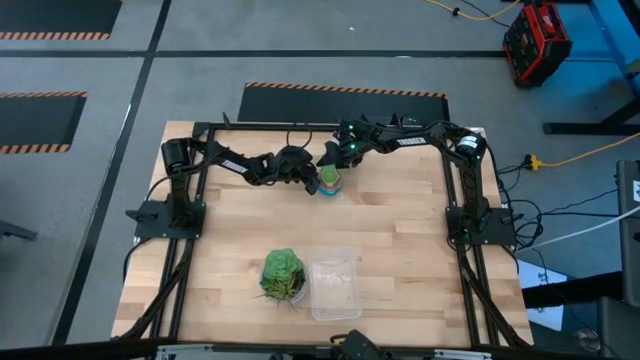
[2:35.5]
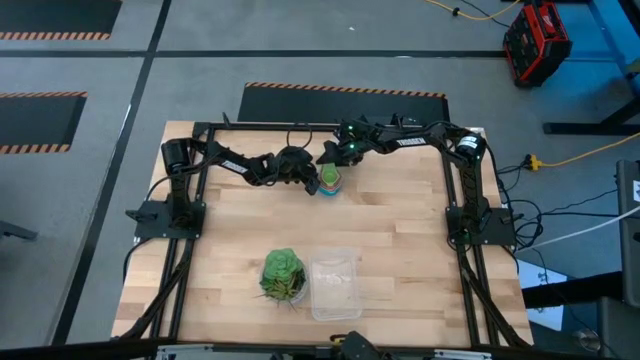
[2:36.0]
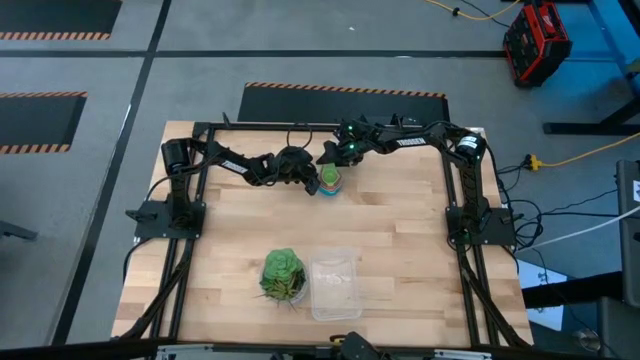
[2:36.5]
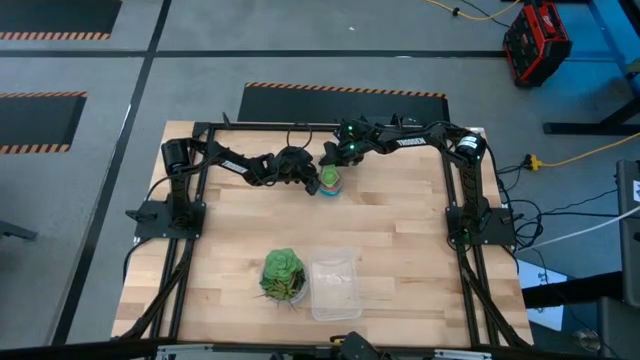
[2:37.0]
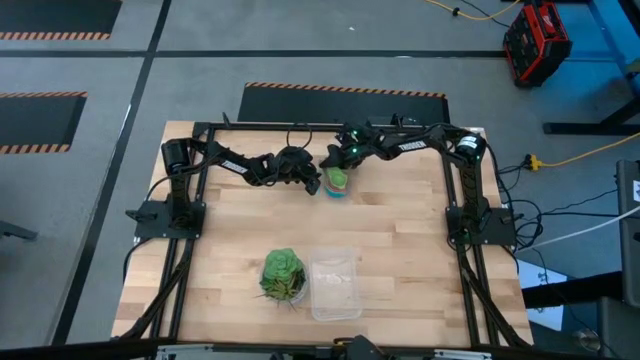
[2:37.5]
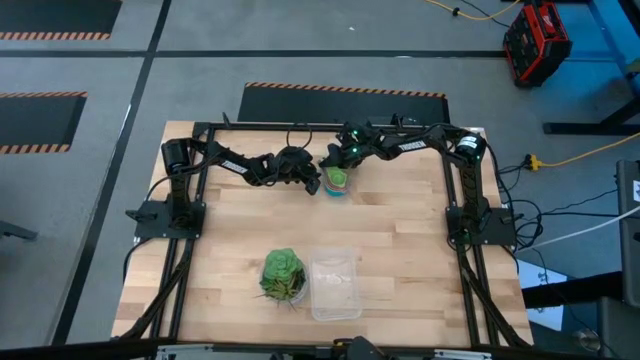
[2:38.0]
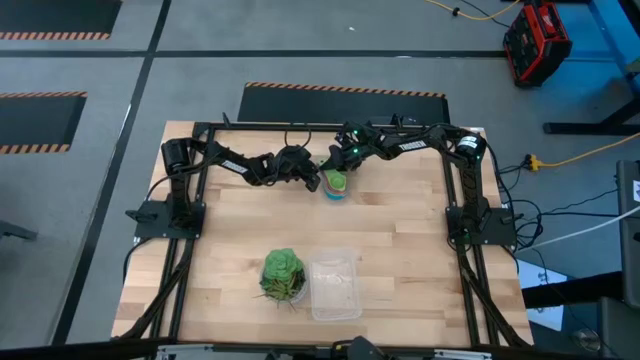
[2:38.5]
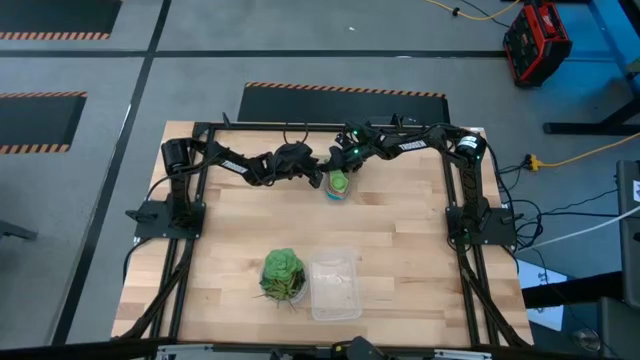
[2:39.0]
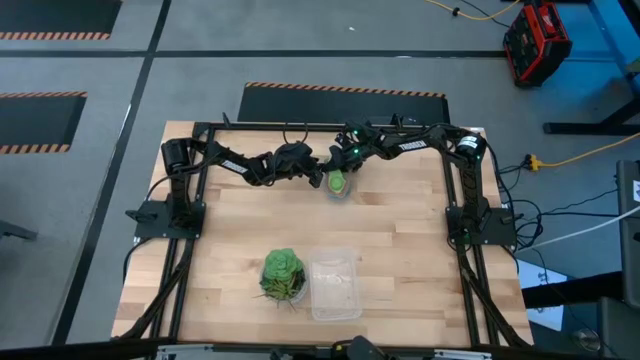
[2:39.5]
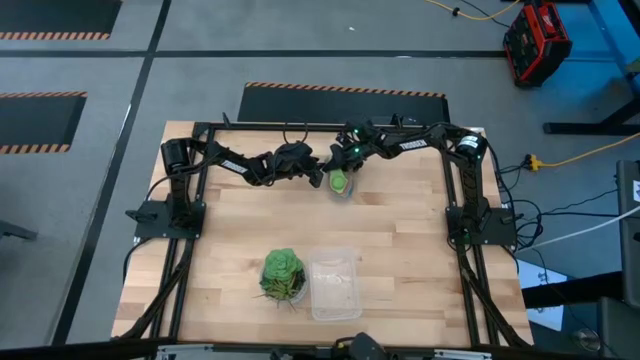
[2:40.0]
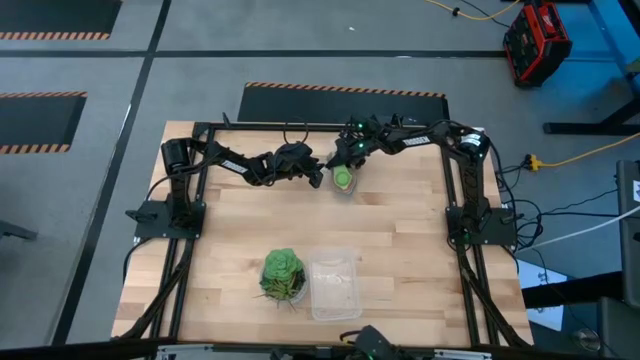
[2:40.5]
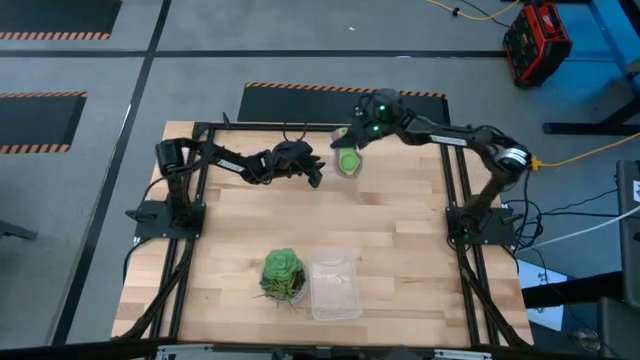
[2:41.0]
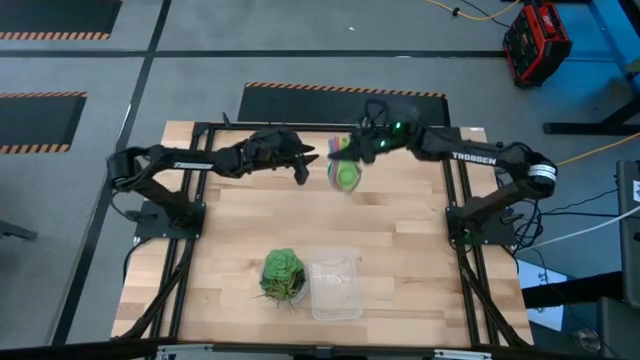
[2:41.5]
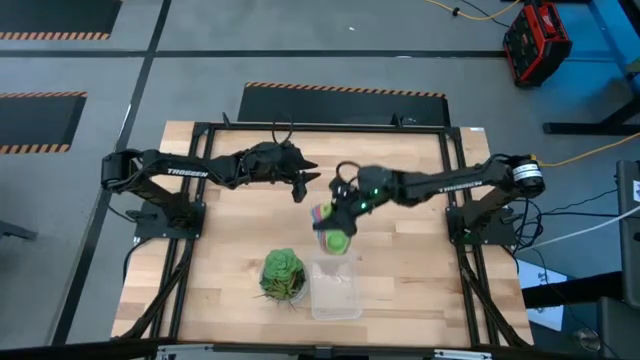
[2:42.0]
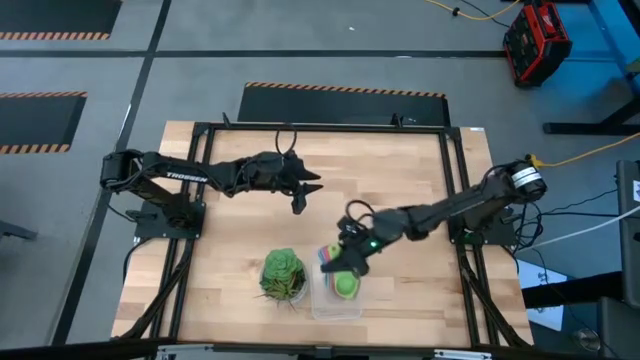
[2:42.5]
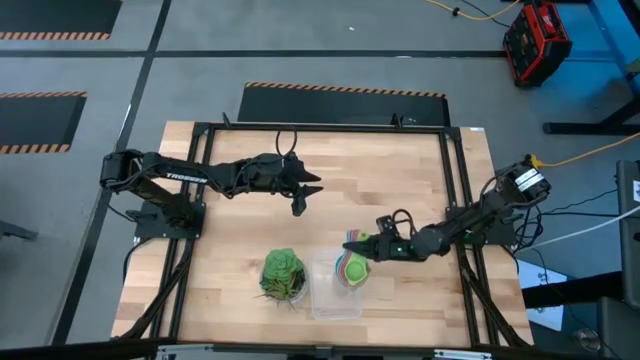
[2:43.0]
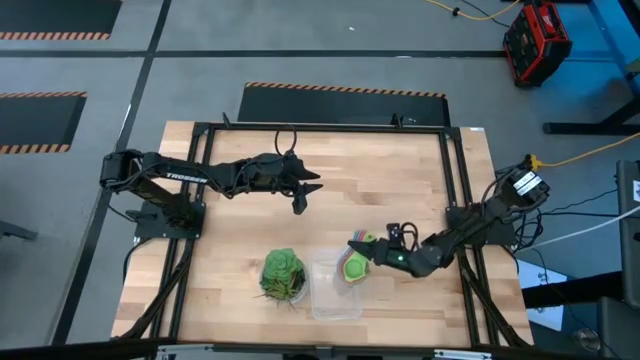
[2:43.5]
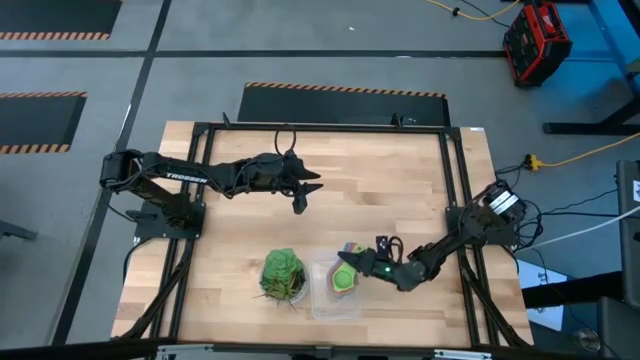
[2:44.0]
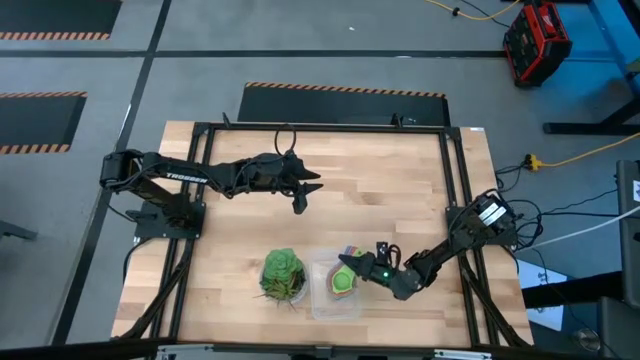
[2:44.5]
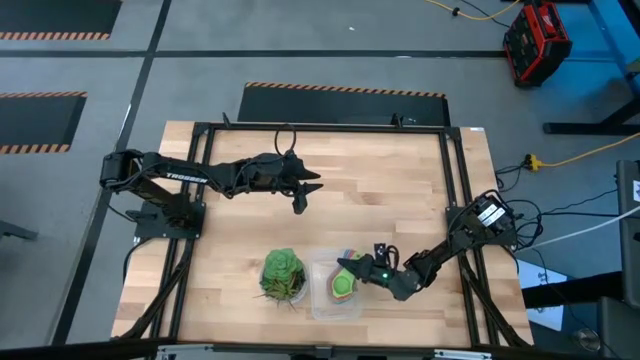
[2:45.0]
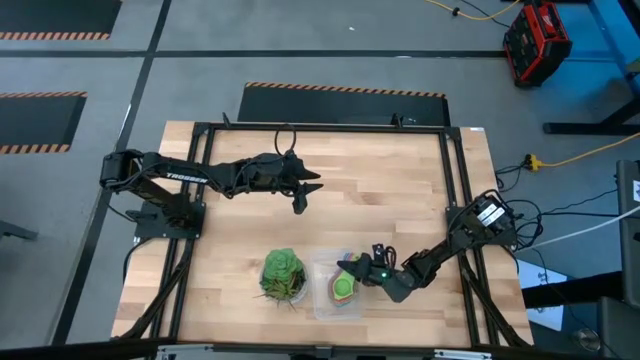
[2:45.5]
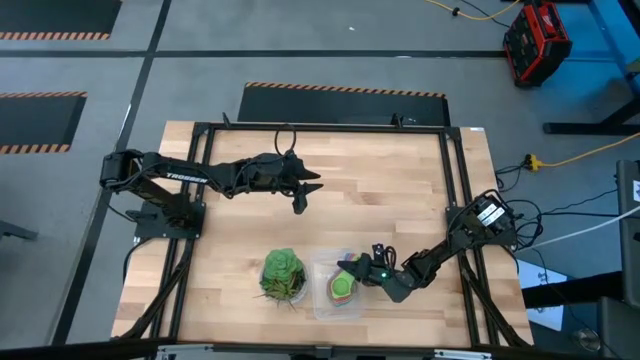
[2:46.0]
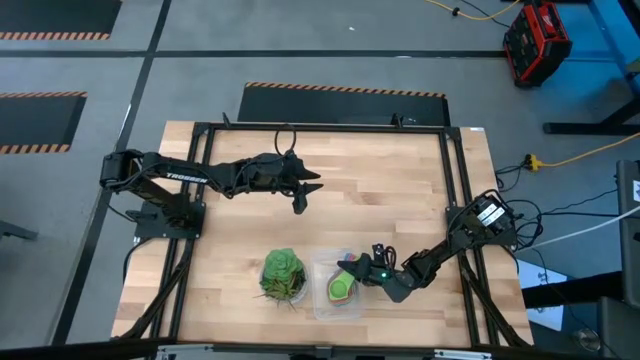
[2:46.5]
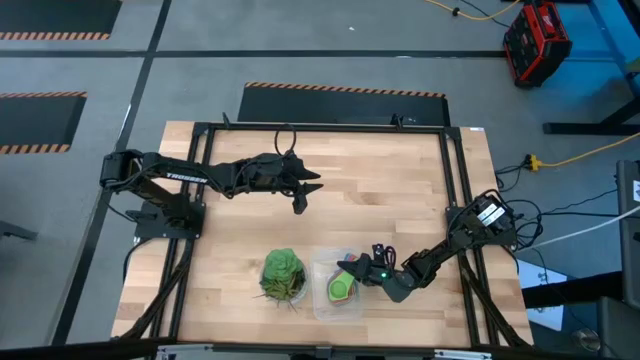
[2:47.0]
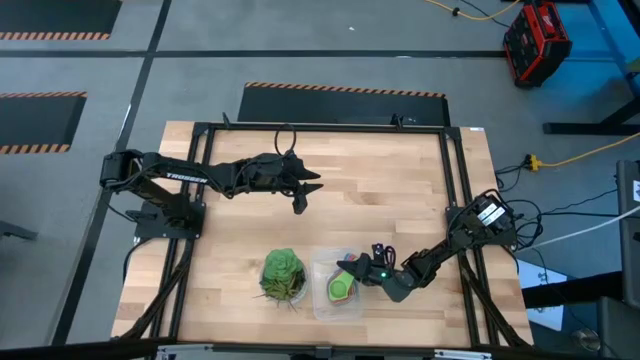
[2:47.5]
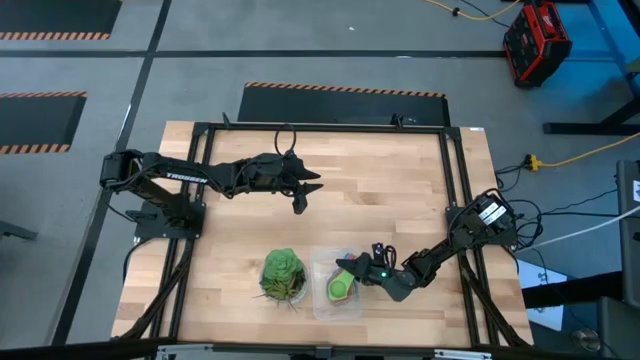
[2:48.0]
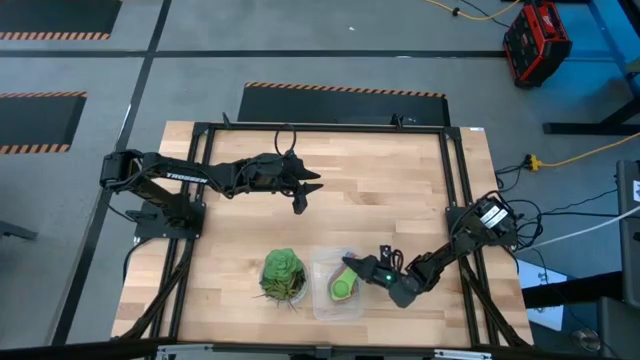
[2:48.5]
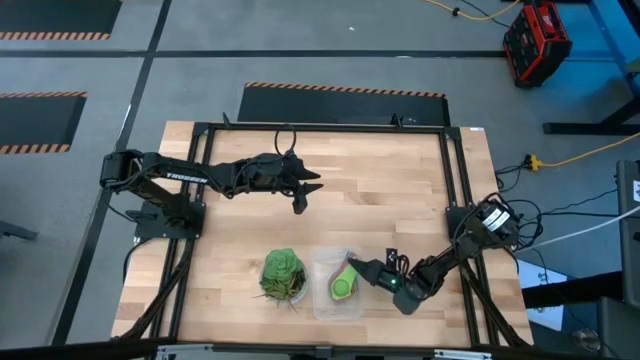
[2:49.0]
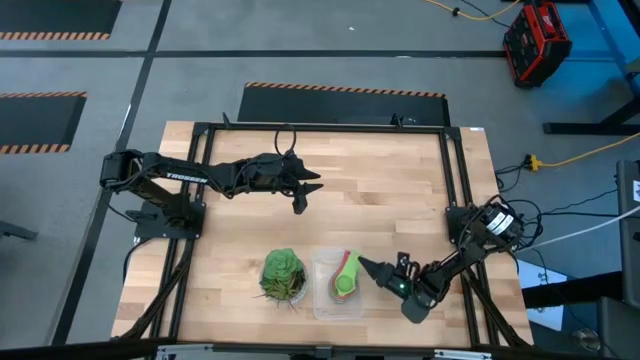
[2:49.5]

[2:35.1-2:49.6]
Task: Nest measuring cups in basket
Put the nested measuring cups into the transparent bin
